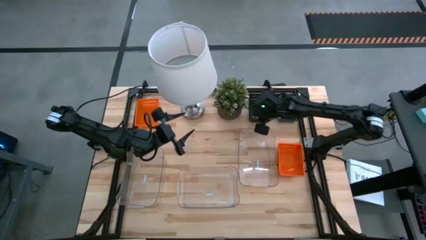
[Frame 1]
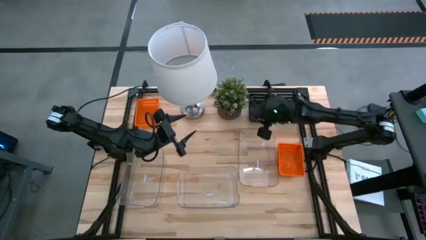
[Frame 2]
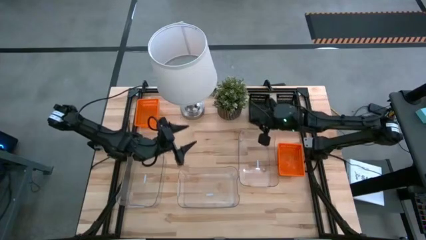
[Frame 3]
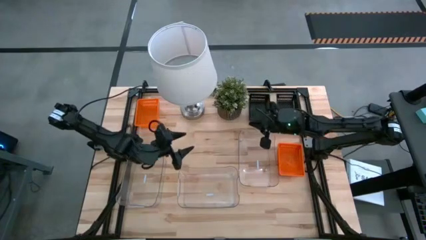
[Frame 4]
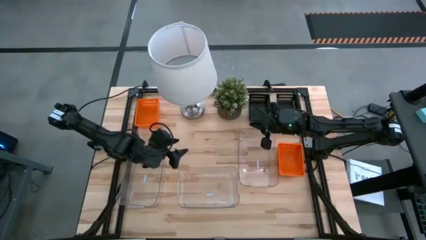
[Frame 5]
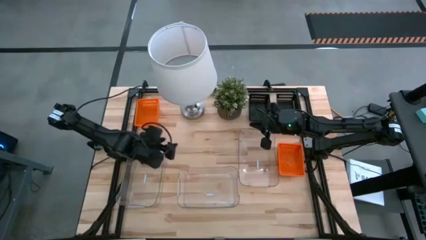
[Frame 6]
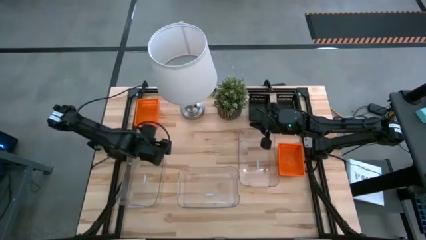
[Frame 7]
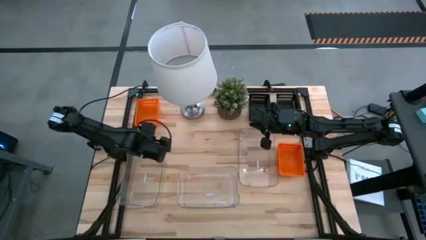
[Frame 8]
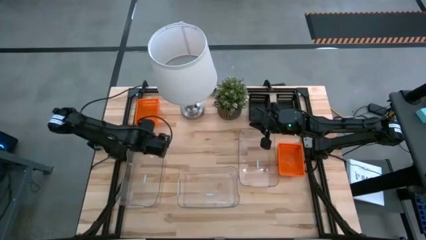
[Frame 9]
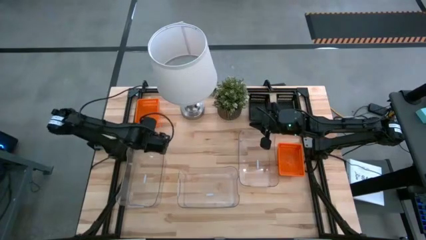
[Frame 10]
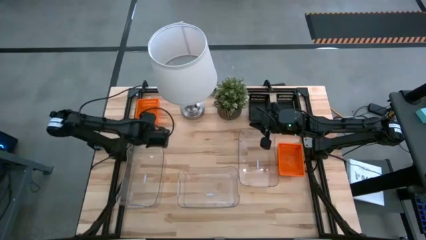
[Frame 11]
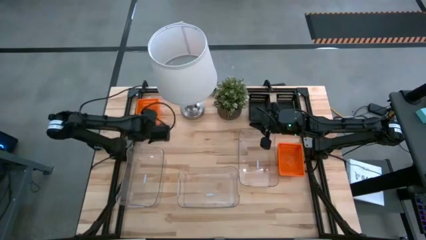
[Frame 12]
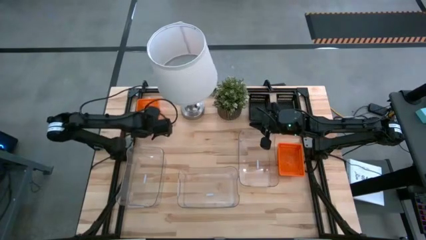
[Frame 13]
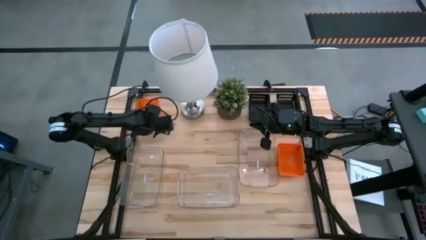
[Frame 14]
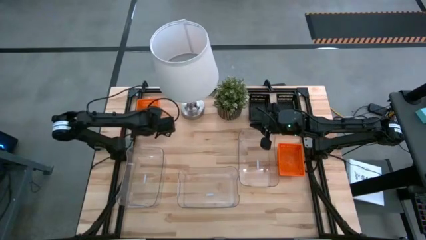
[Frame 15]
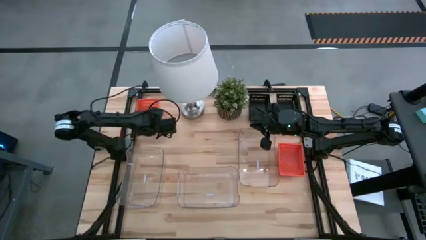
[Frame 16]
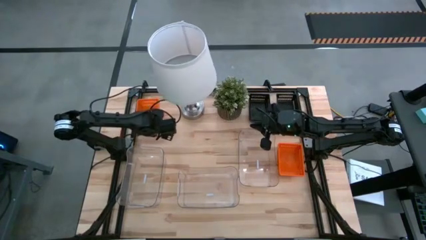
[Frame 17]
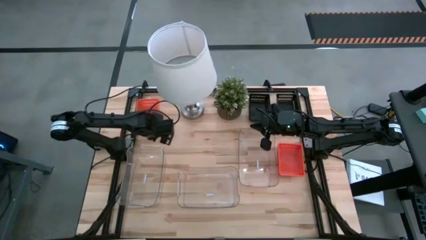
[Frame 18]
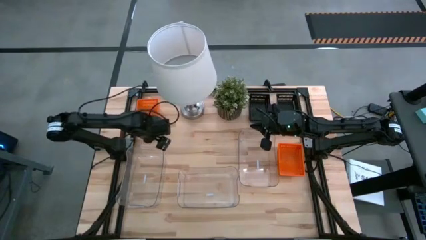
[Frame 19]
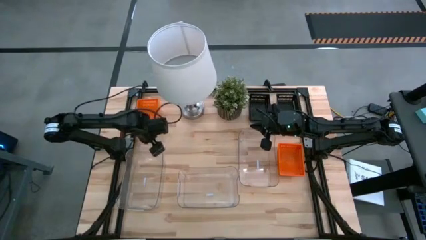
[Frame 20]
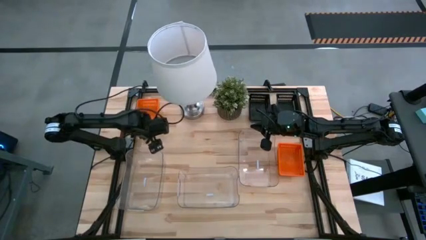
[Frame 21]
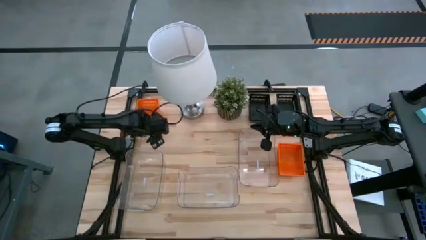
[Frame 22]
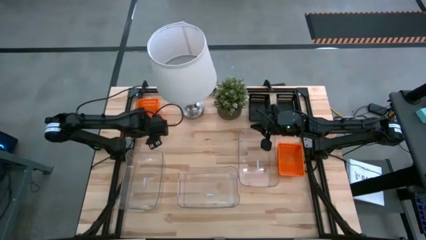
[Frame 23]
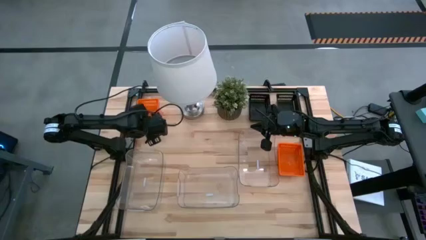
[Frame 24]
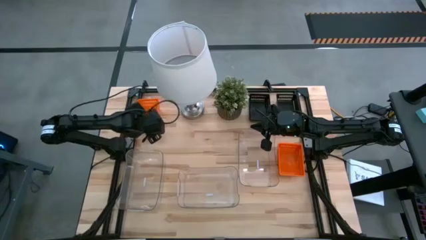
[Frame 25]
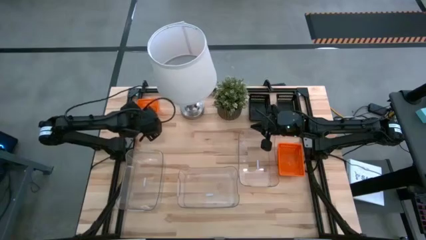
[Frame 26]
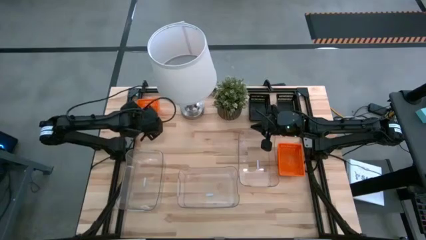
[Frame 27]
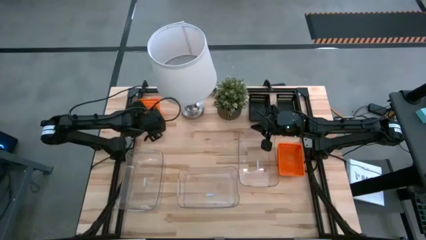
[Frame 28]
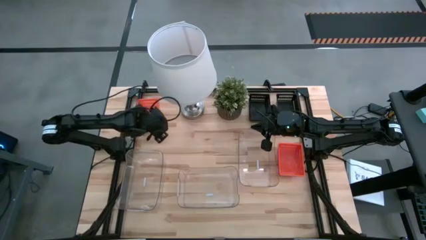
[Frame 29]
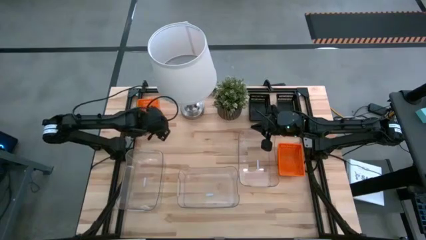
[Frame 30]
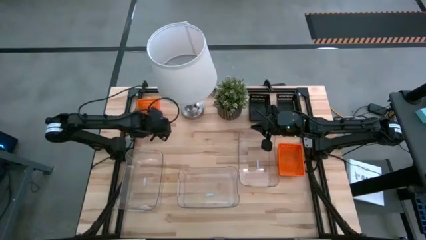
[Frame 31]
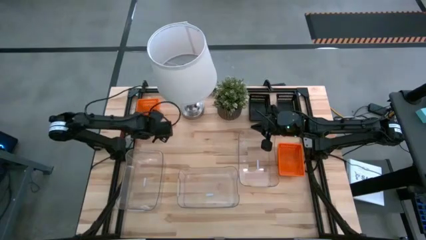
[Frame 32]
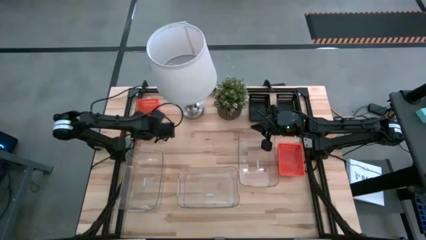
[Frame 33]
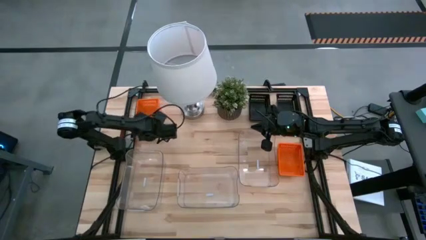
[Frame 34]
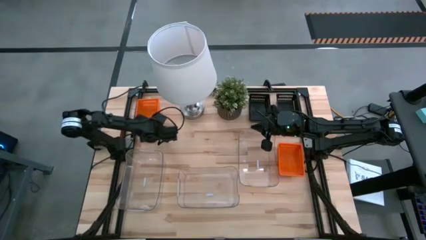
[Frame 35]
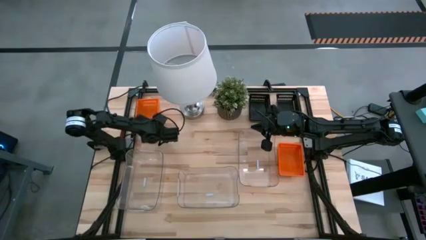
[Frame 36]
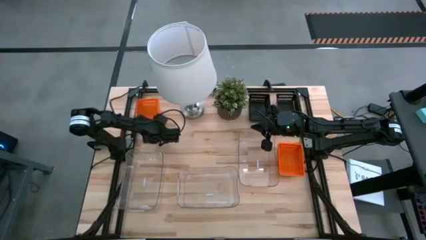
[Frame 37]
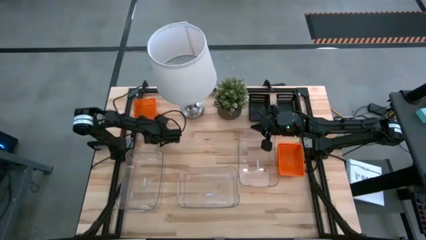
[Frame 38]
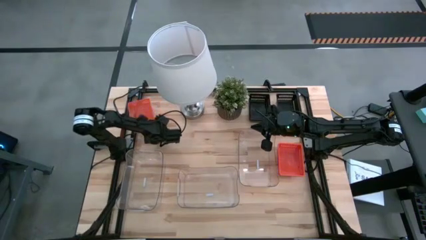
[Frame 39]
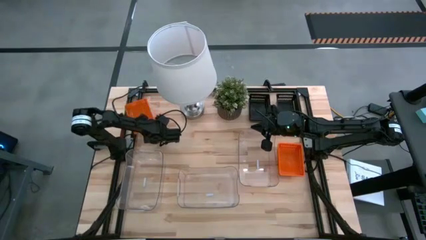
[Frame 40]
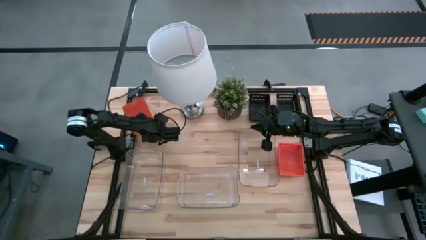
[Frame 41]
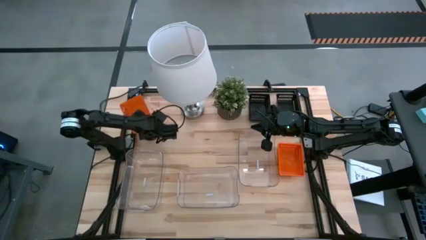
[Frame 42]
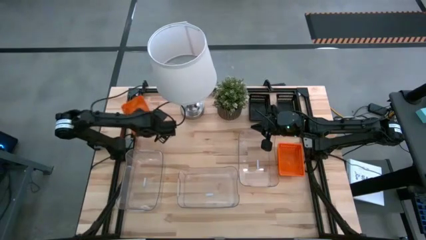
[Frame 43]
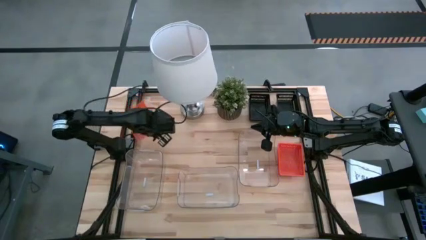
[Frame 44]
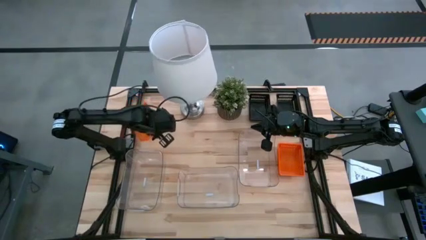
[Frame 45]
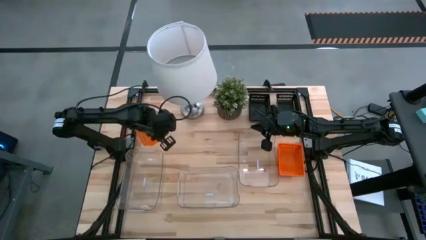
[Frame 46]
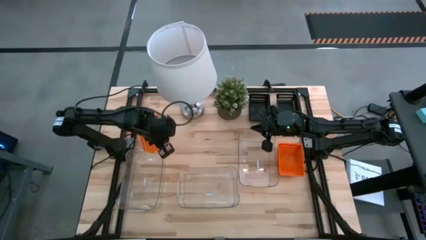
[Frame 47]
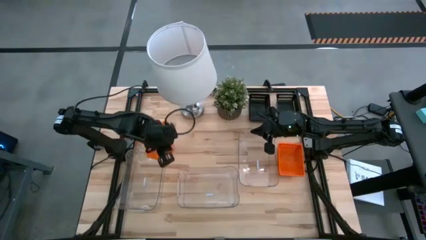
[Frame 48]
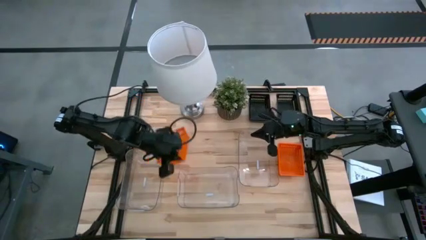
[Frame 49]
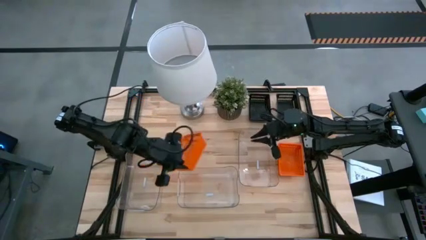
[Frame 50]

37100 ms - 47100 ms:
Stack the left orange bin on the orange bins

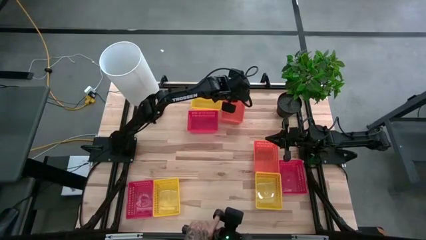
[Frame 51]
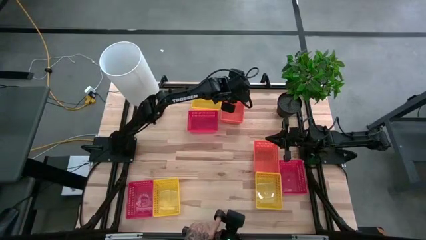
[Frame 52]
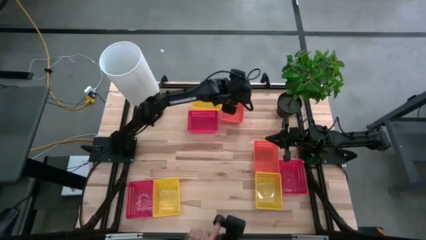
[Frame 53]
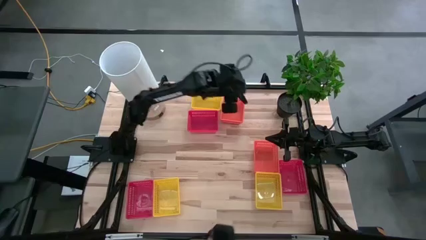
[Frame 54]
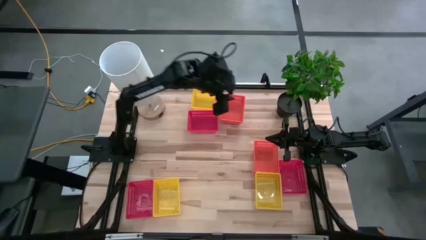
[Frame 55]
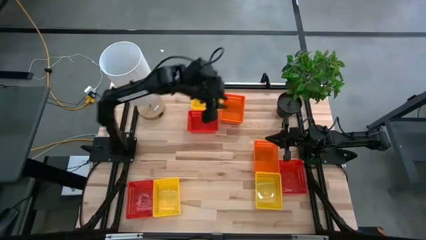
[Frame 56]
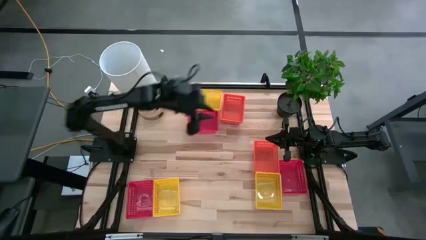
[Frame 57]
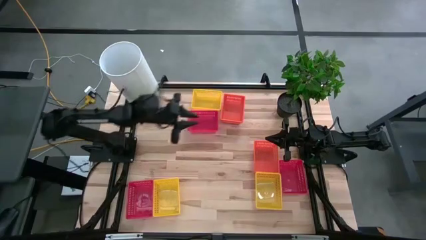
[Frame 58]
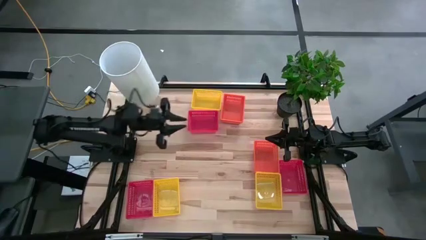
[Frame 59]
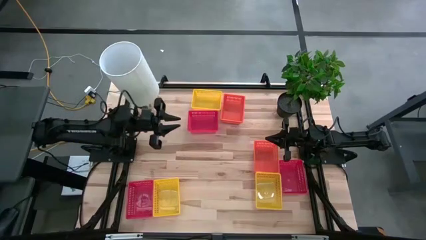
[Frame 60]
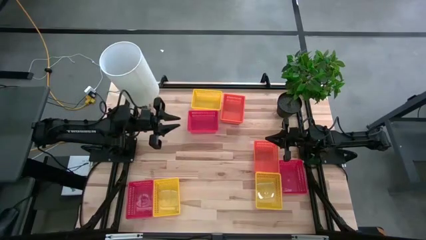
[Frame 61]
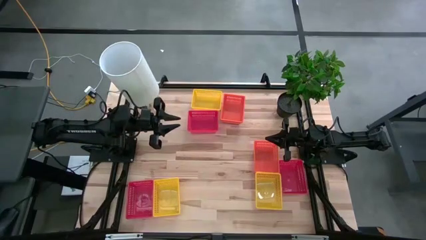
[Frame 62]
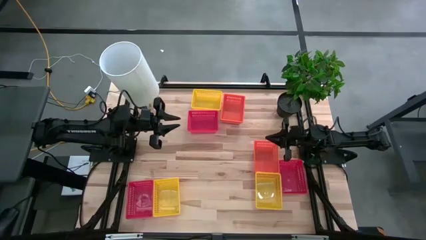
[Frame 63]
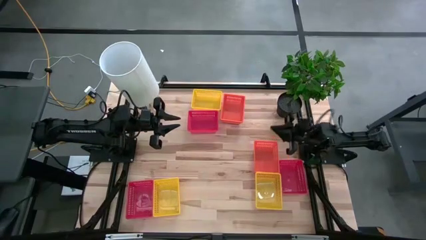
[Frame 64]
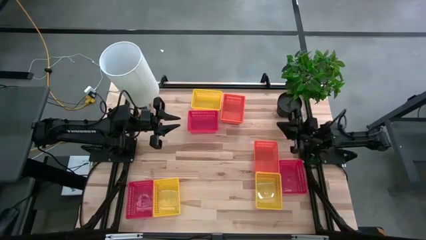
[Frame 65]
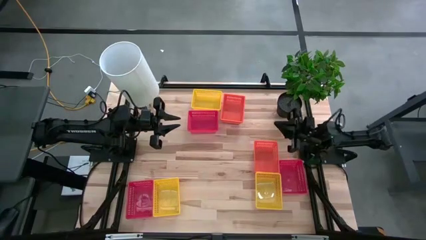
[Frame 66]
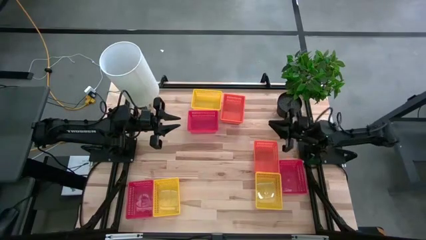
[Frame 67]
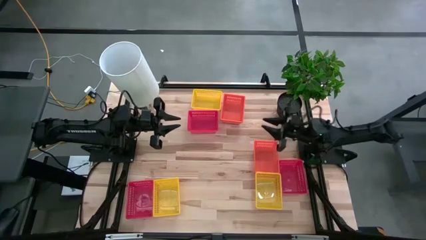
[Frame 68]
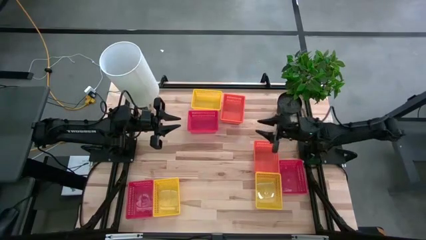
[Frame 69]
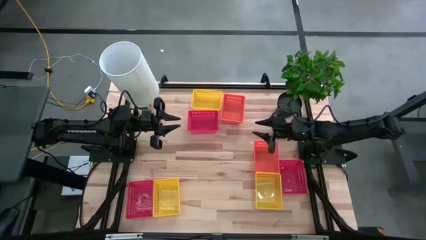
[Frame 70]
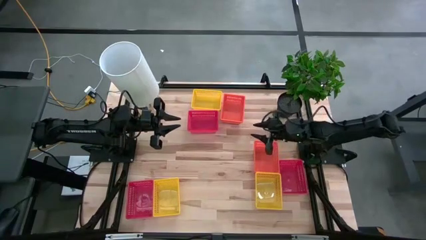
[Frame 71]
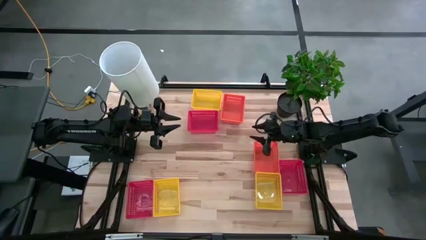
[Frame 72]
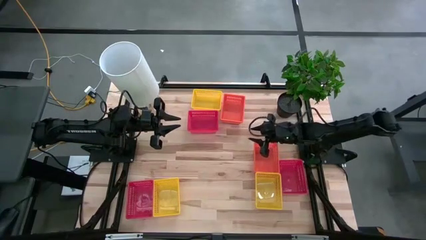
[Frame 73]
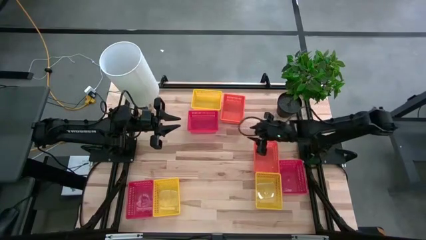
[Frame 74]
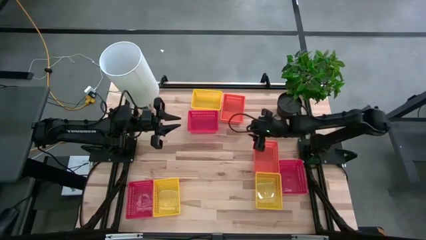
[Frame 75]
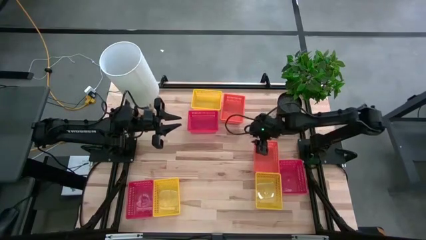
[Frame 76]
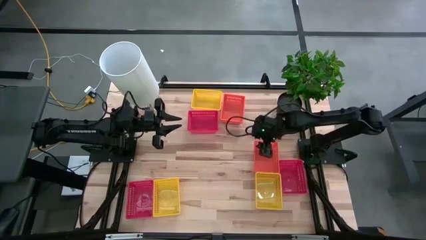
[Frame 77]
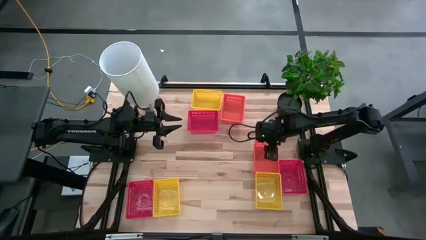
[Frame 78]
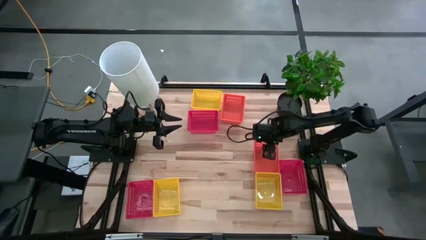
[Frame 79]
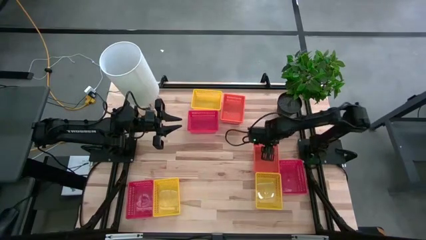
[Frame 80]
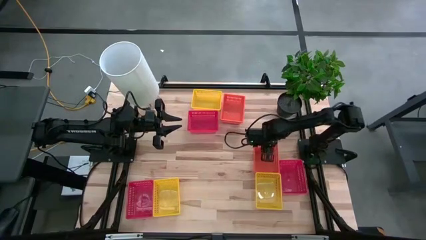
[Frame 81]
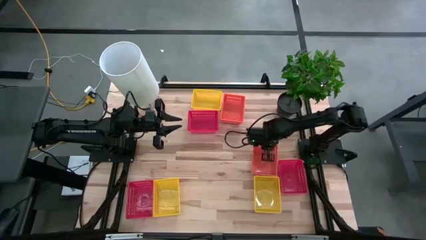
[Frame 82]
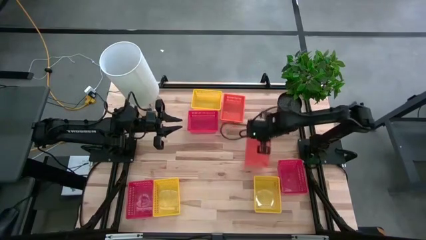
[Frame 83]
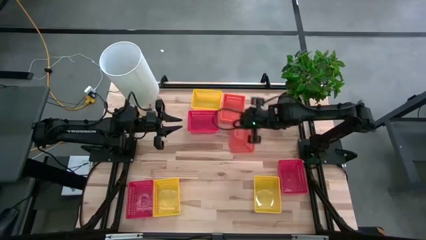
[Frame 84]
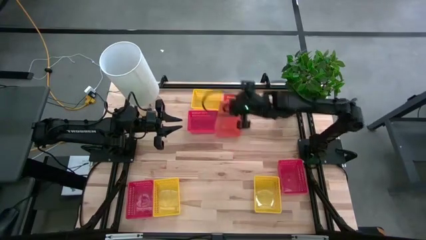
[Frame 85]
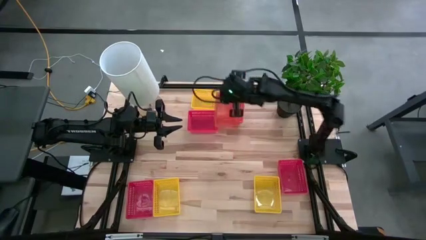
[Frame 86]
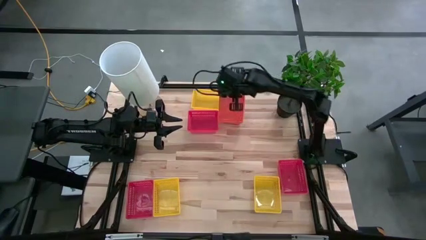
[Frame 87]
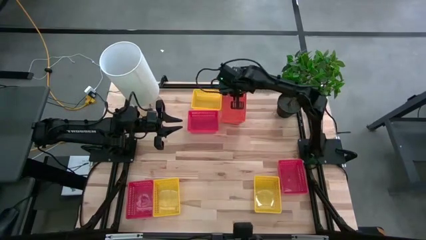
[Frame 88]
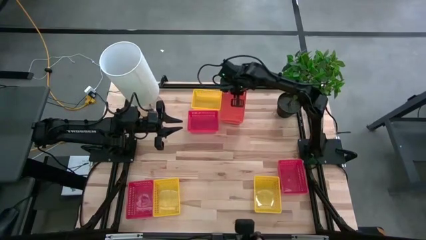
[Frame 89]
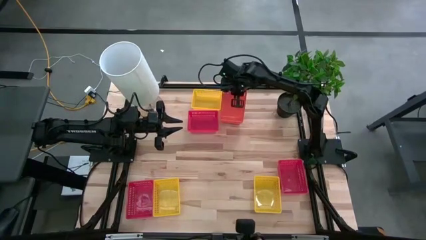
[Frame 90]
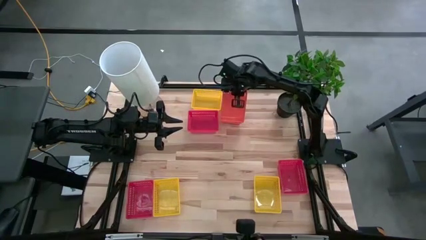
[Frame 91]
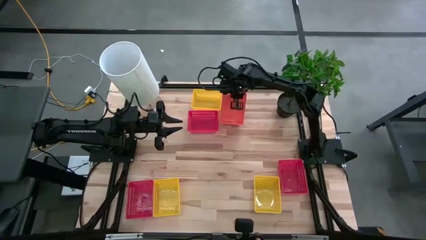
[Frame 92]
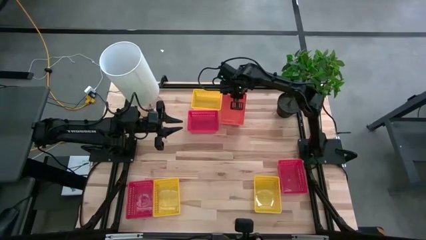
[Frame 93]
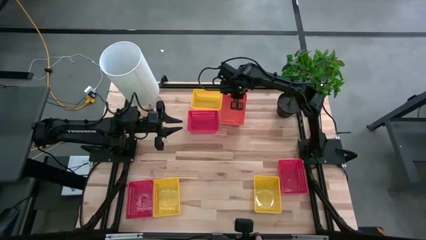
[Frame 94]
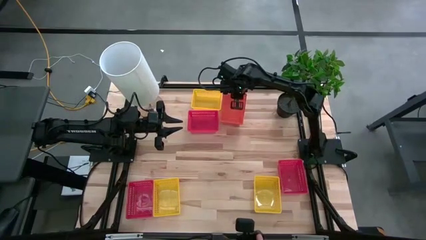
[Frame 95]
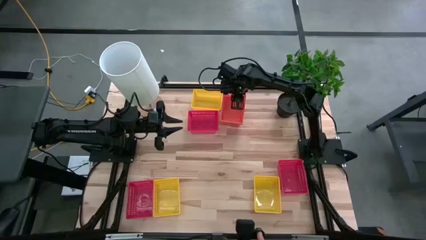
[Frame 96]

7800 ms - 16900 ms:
Stack the bottom orange bin on the top orange bin
